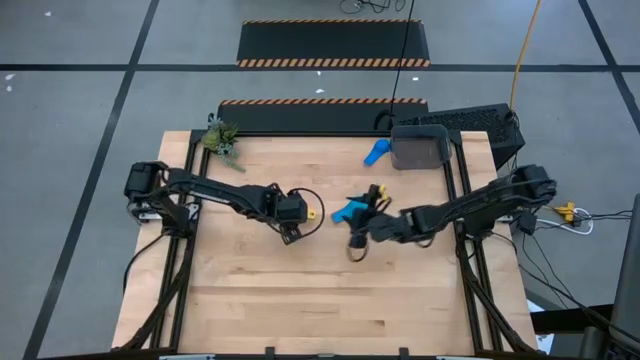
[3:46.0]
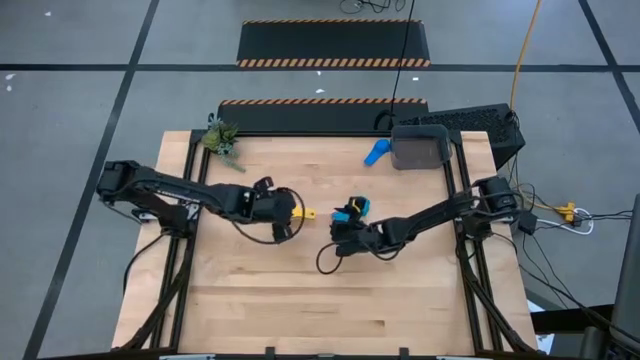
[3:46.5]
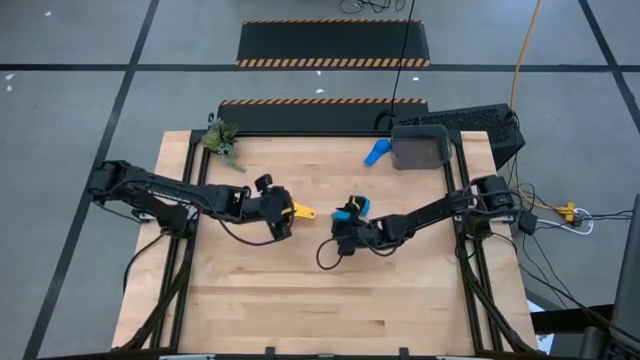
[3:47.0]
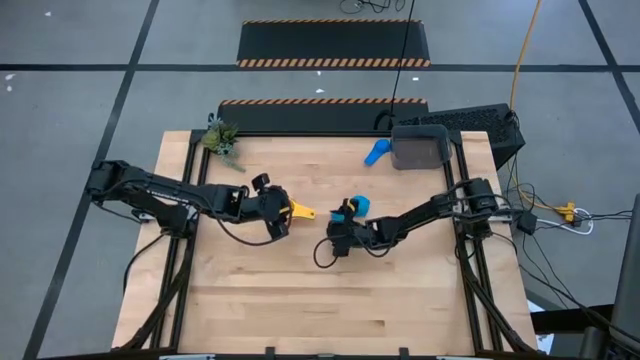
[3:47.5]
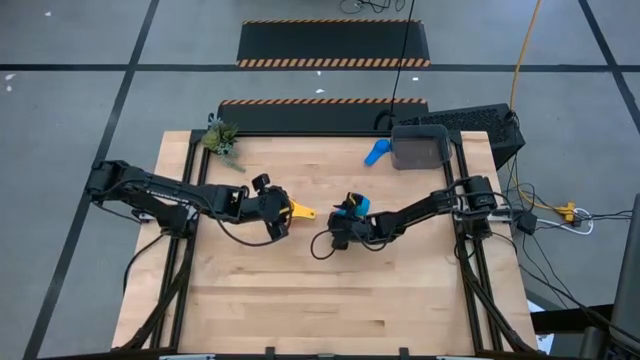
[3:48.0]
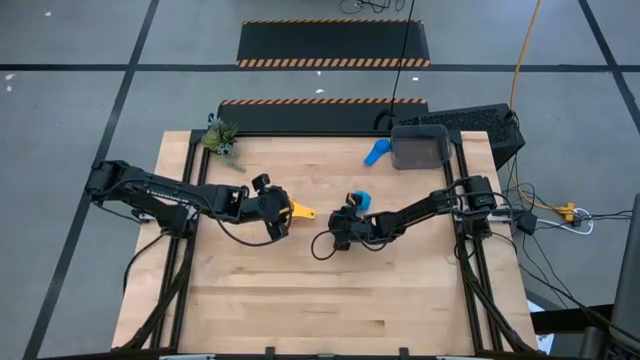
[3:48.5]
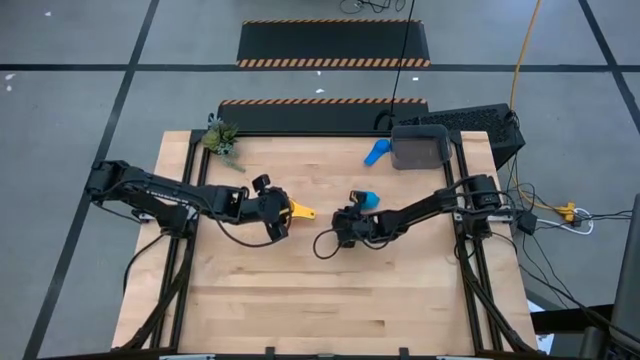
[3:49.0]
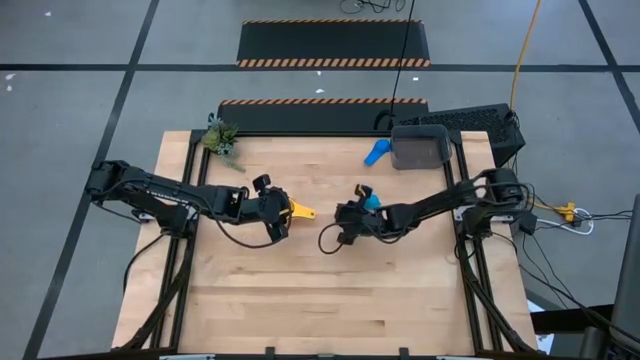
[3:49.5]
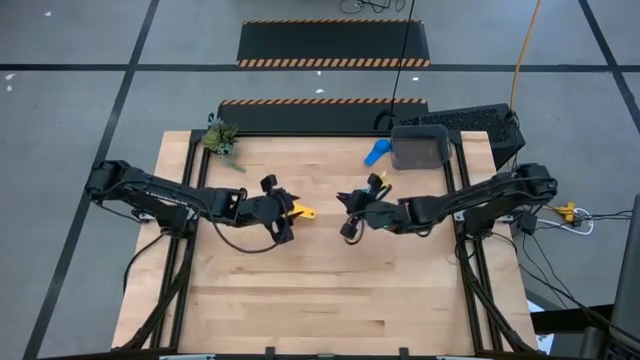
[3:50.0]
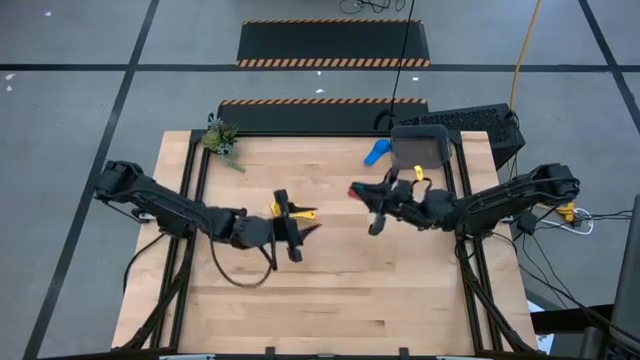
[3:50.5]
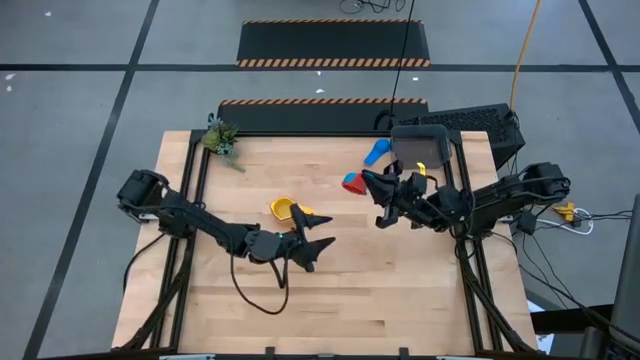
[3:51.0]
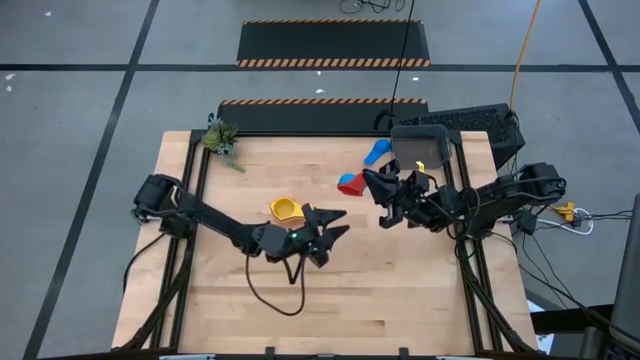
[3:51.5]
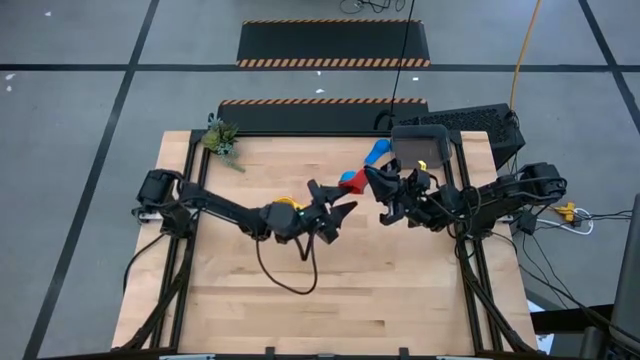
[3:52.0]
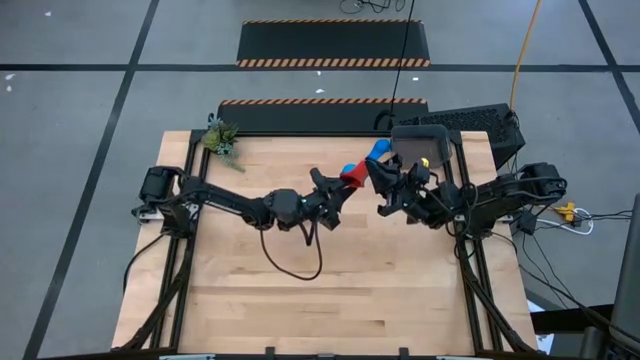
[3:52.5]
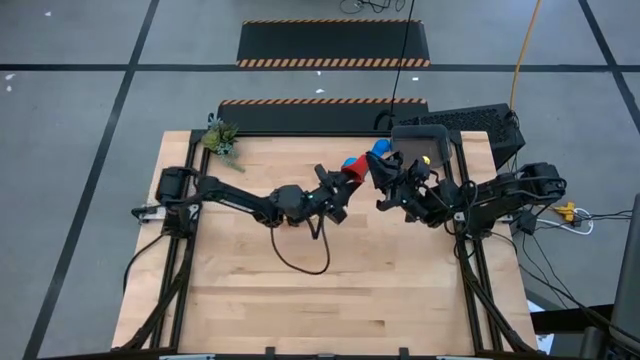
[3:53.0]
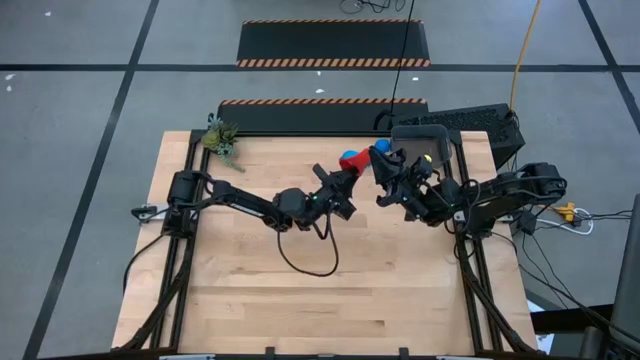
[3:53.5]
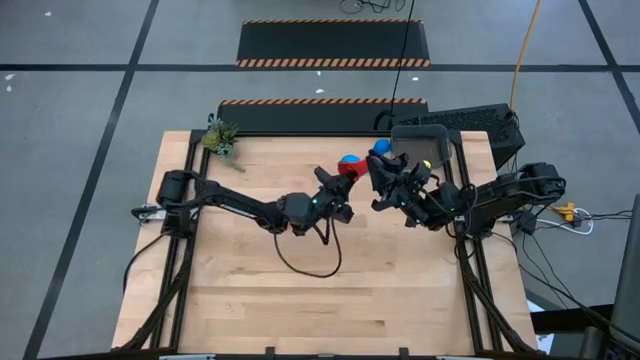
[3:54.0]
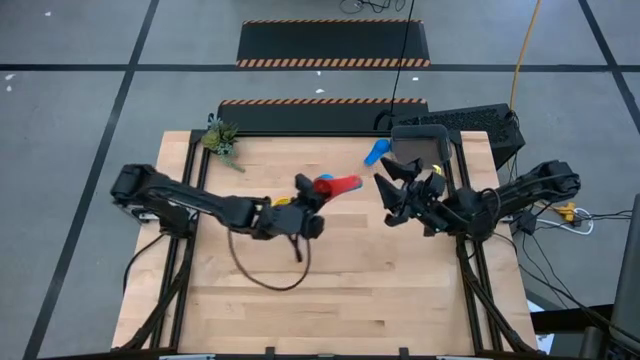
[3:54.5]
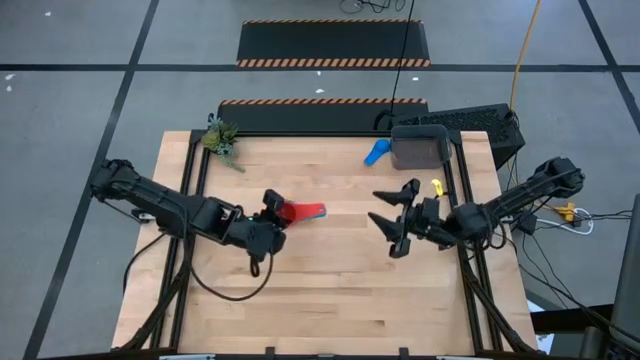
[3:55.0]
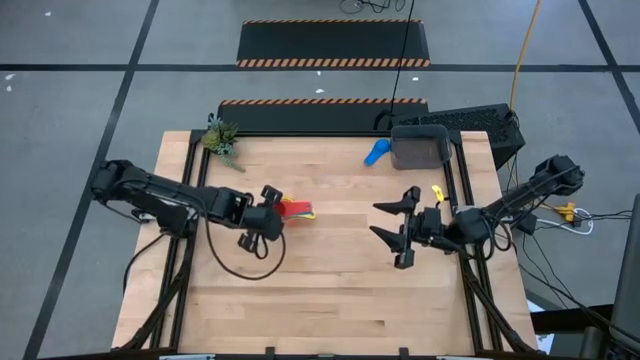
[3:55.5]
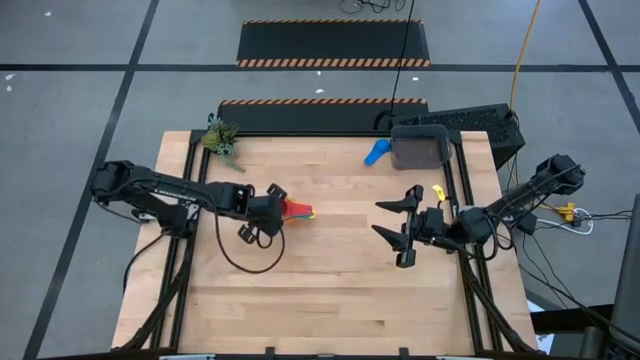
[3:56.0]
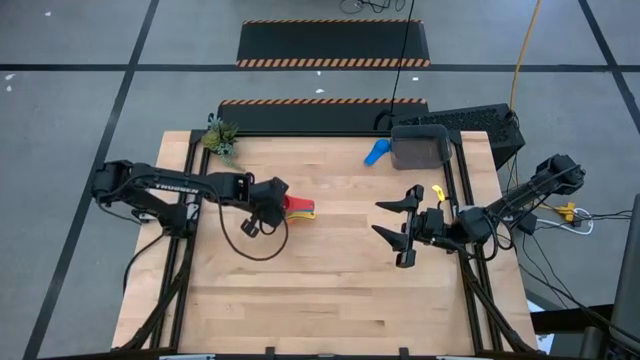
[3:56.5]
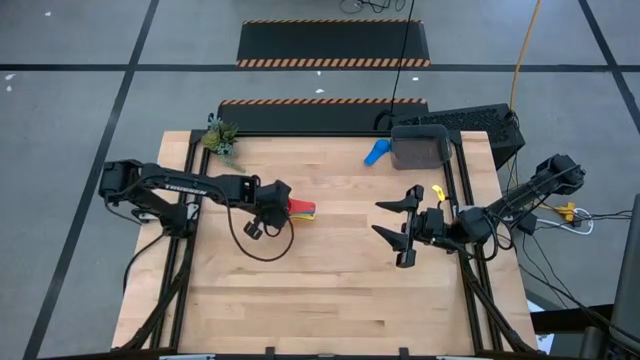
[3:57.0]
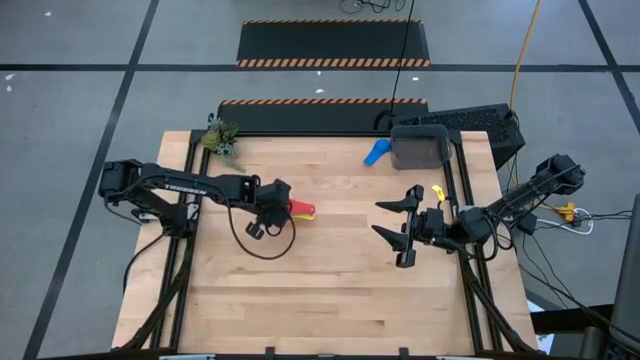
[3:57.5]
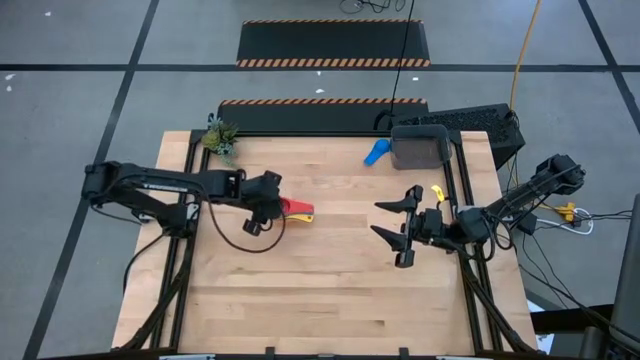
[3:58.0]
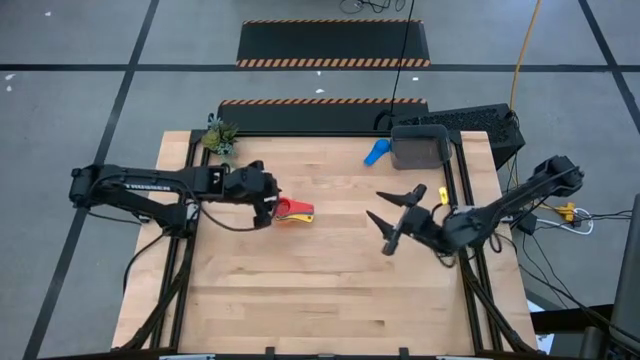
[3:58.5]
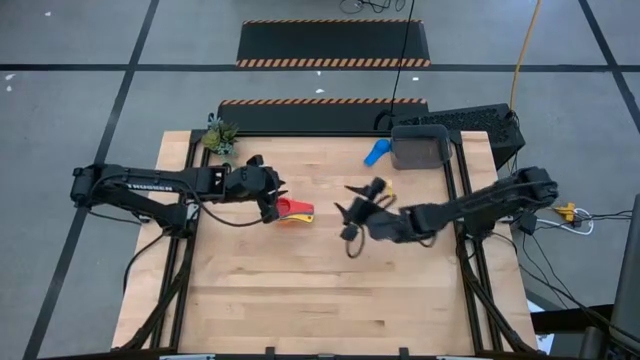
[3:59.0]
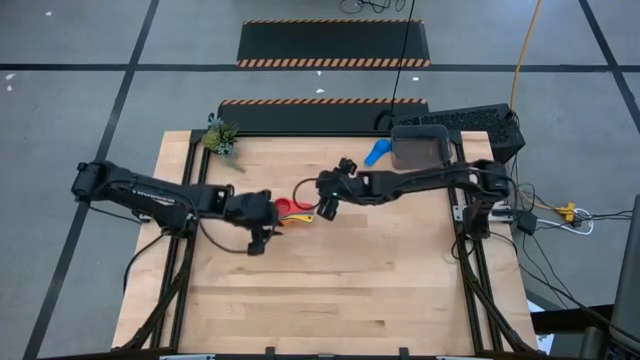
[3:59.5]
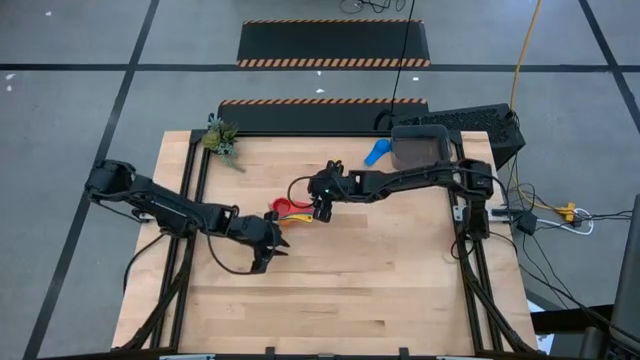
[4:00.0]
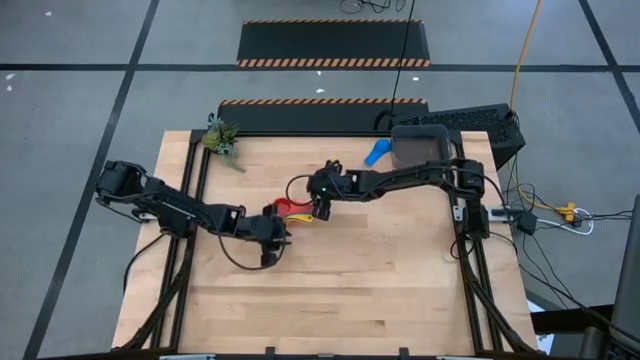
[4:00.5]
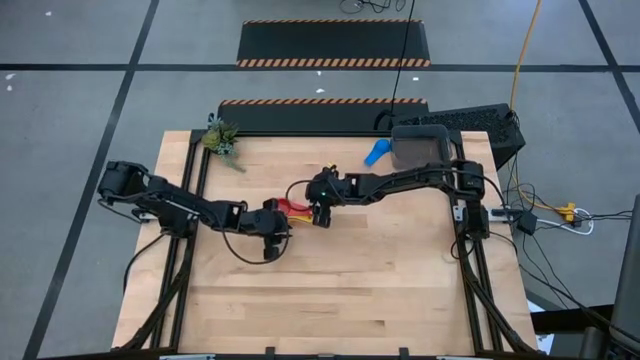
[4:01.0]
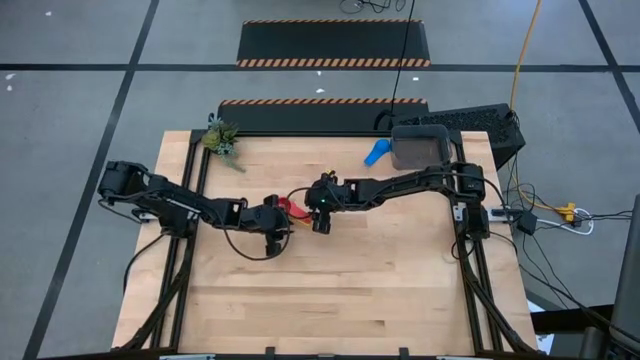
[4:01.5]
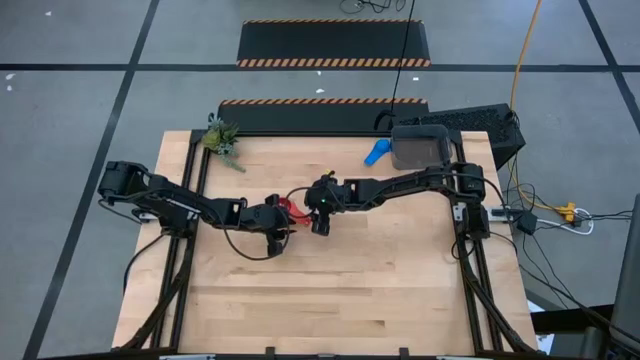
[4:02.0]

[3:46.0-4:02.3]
Task: Nest measuring cups in basket
Stack the measuring cups on top of the other stacked measuring cups

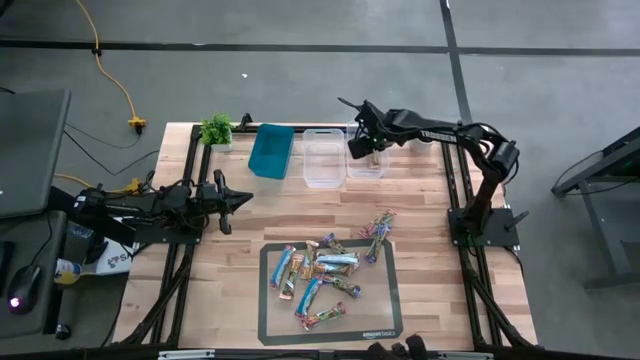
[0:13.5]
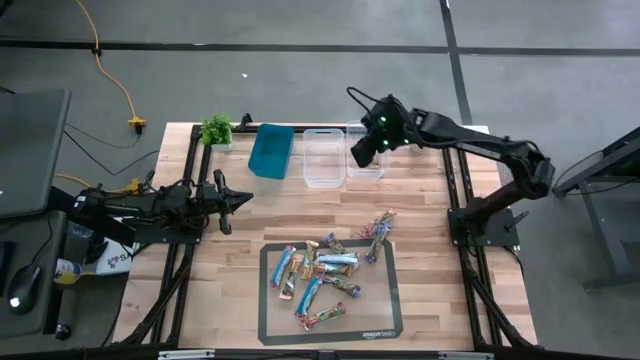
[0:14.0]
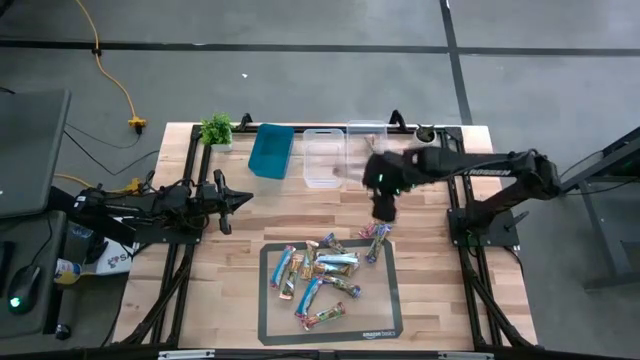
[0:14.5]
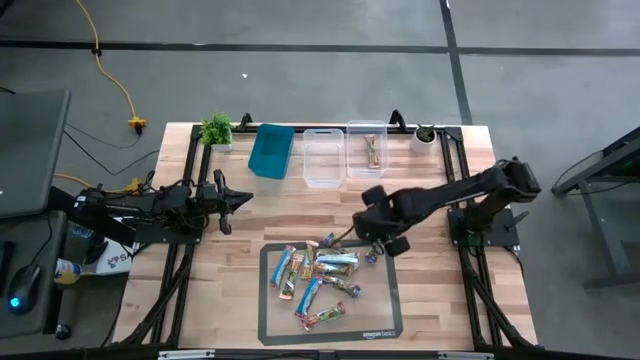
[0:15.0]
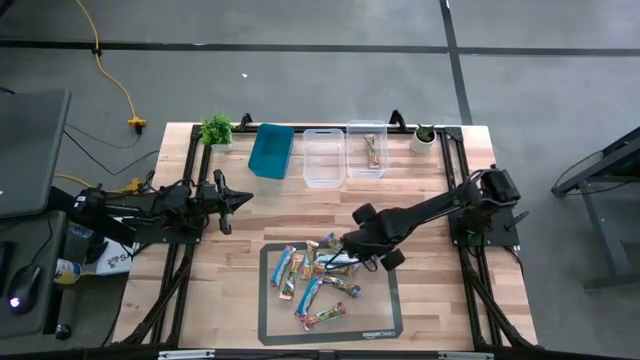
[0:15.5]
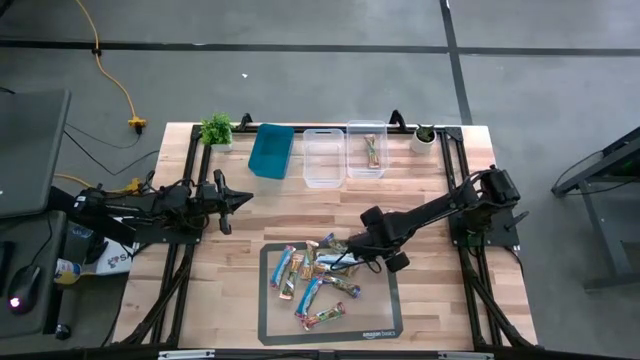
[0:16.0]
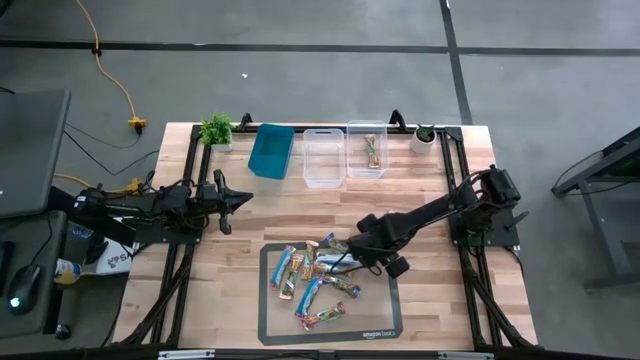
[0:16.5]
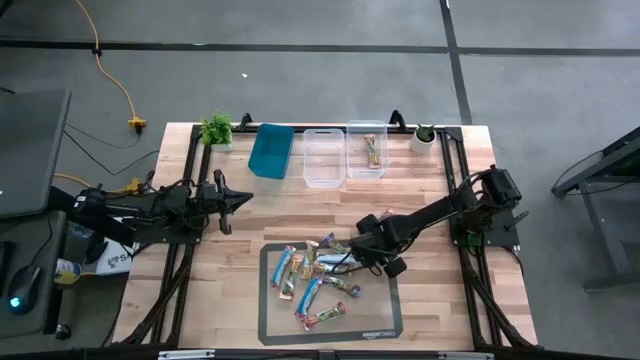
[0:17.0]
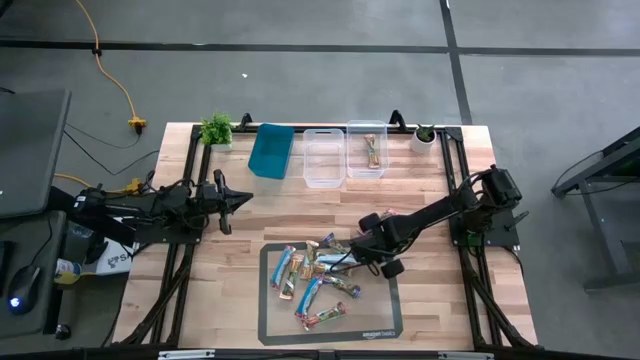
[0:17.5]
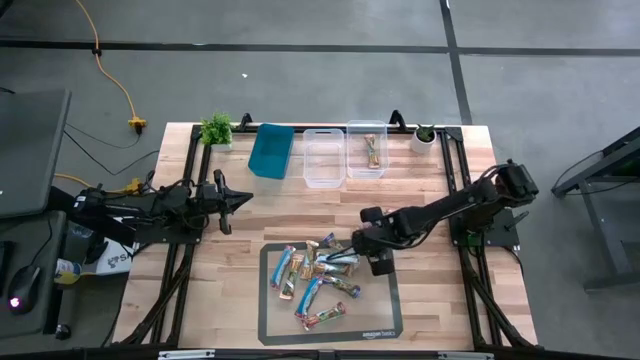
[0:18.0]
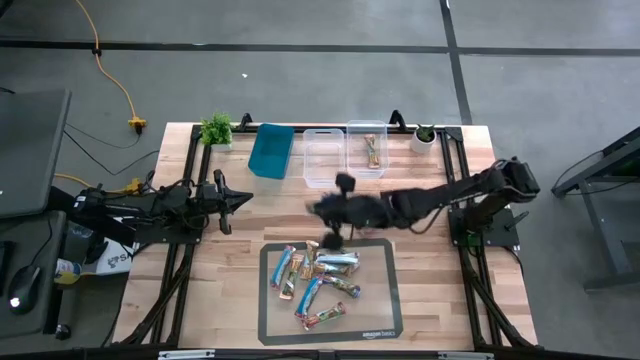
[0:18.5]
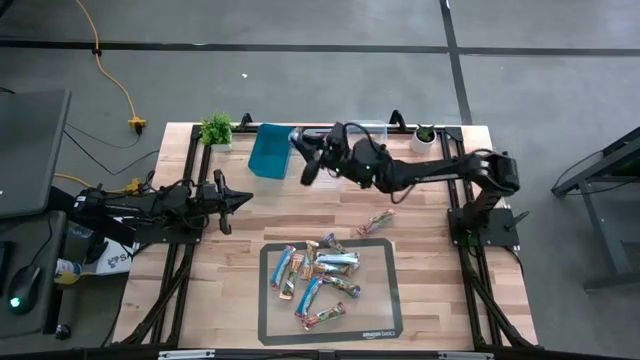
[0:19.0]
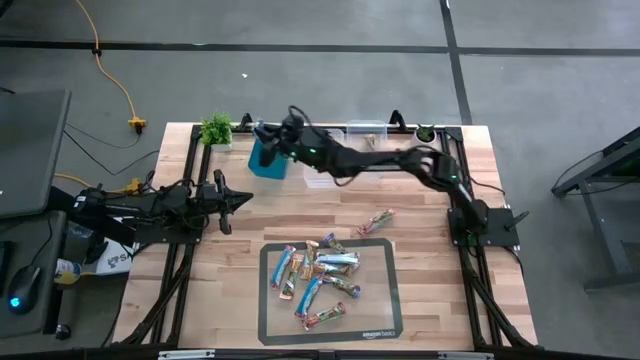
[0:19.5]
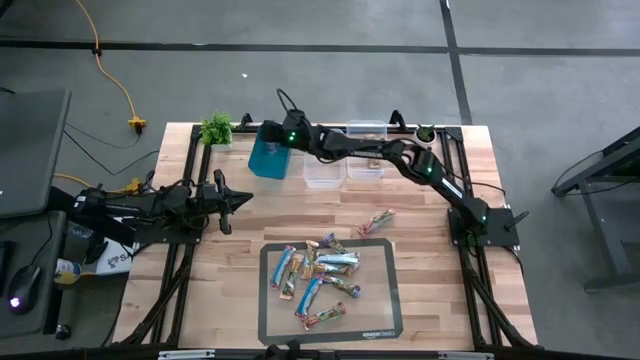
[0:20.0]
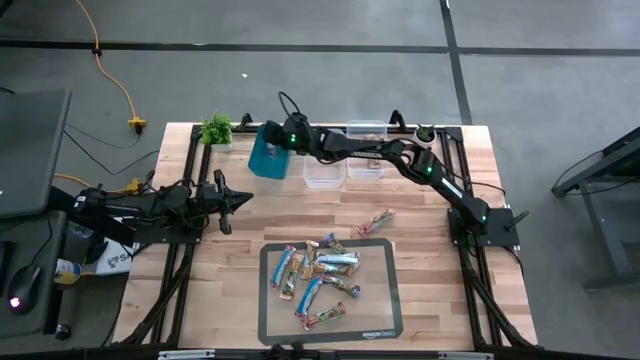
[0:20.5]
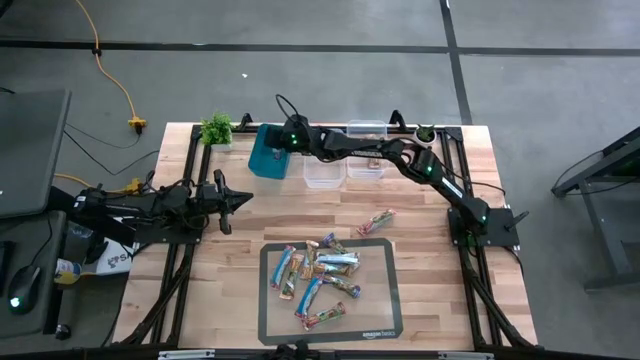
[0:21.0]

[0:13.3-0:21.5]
Task: Pick and place Granola Bars by type
Put the top right blue granola bar into the blue bin
